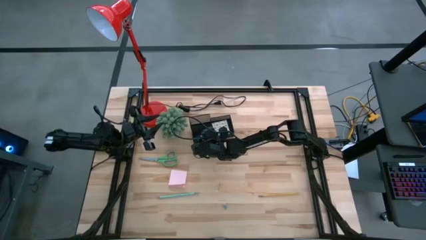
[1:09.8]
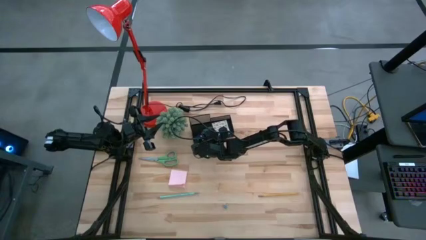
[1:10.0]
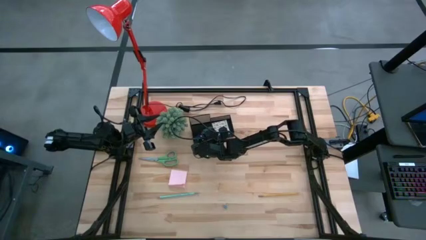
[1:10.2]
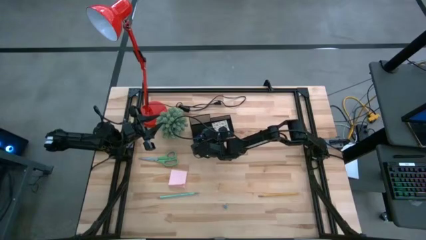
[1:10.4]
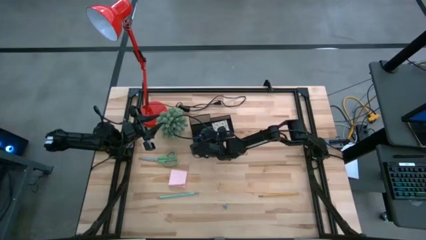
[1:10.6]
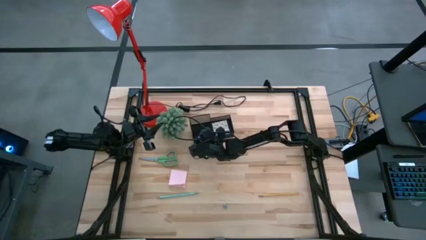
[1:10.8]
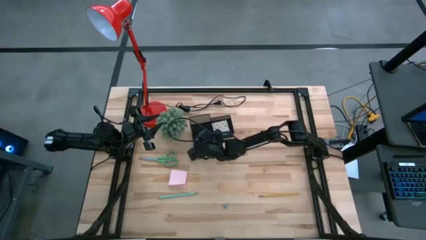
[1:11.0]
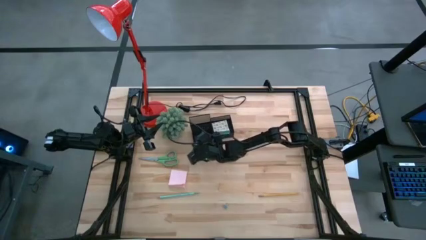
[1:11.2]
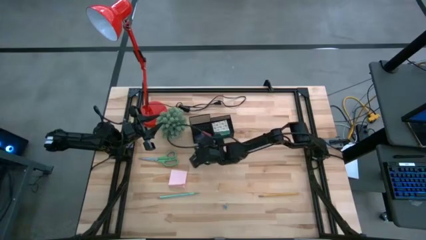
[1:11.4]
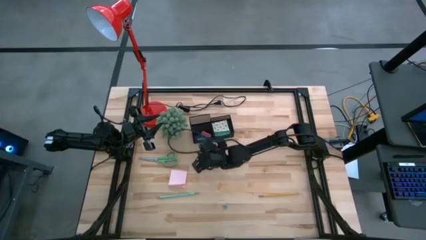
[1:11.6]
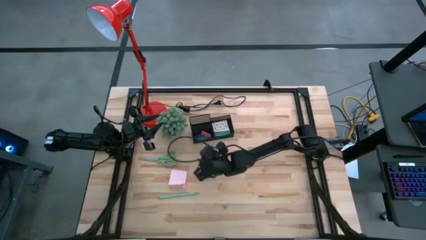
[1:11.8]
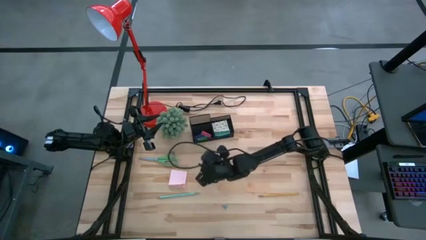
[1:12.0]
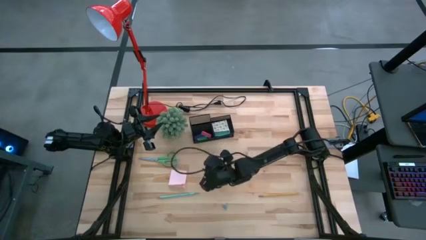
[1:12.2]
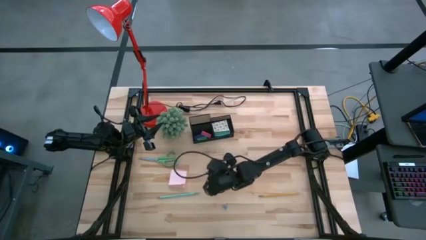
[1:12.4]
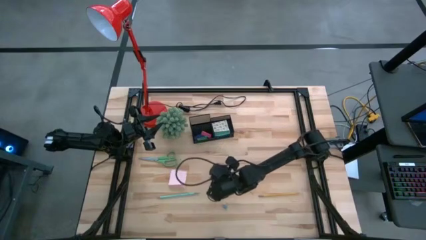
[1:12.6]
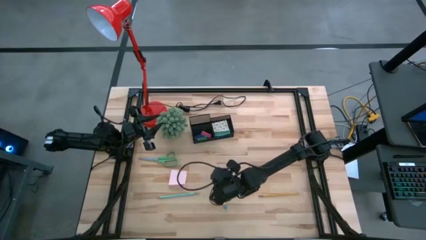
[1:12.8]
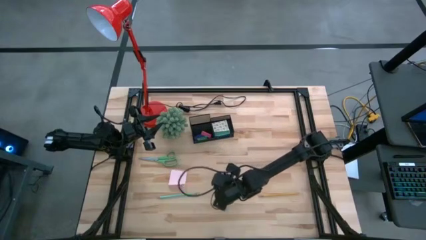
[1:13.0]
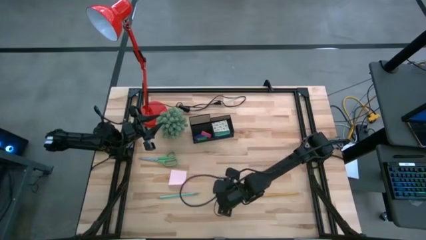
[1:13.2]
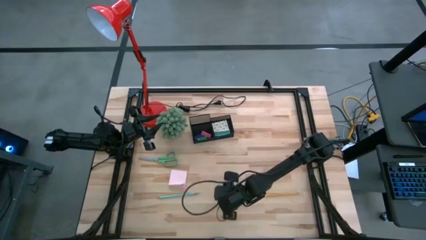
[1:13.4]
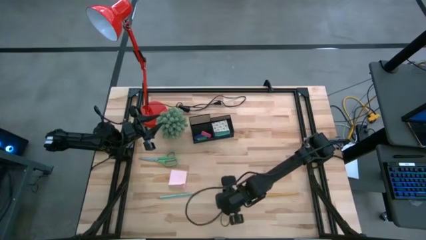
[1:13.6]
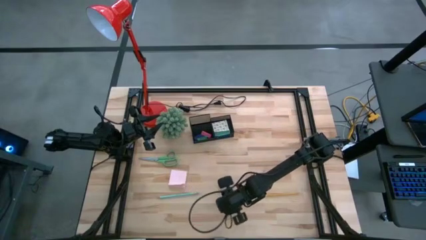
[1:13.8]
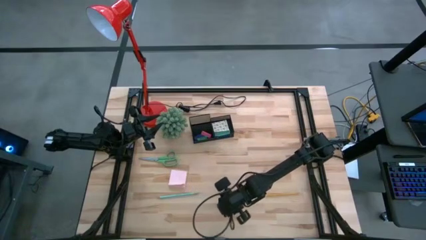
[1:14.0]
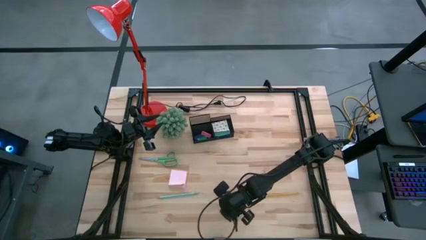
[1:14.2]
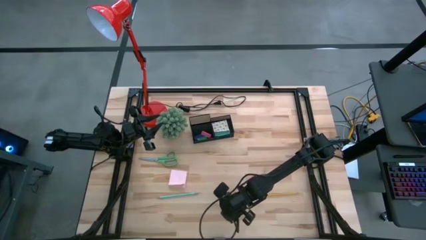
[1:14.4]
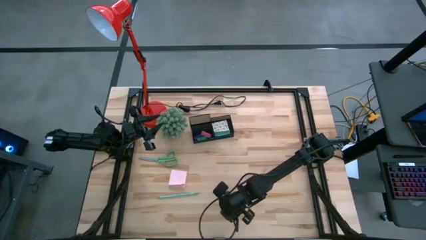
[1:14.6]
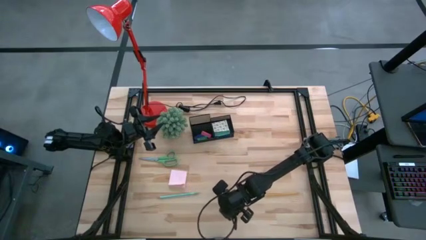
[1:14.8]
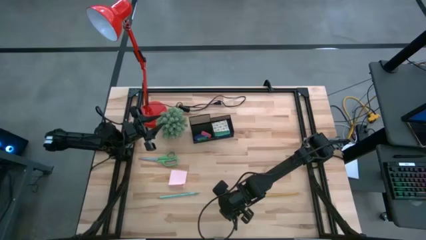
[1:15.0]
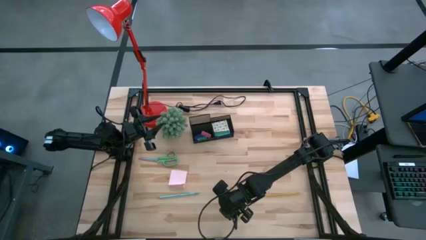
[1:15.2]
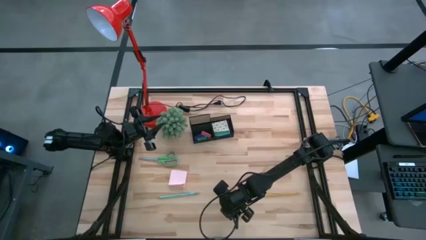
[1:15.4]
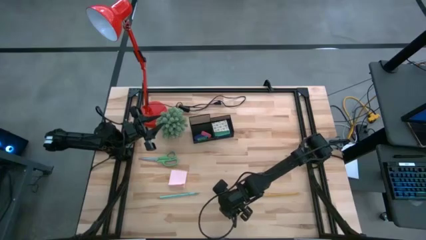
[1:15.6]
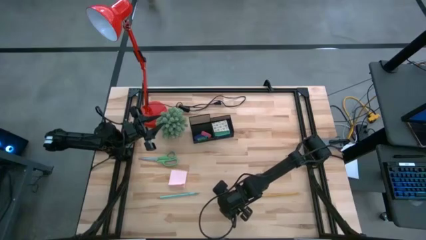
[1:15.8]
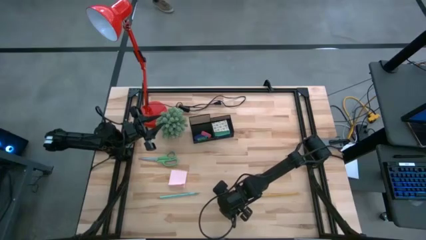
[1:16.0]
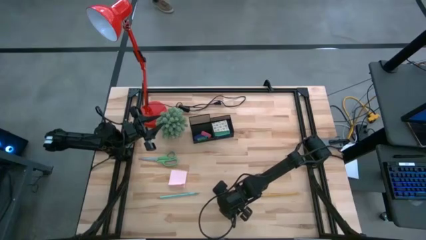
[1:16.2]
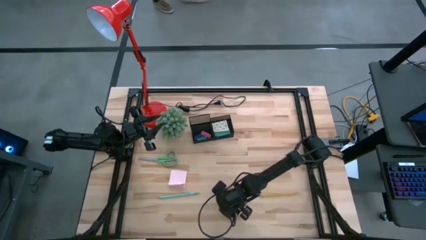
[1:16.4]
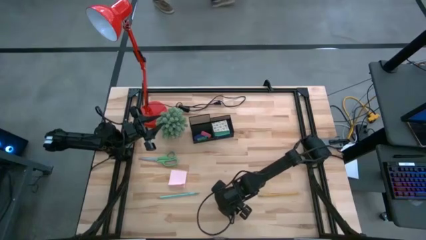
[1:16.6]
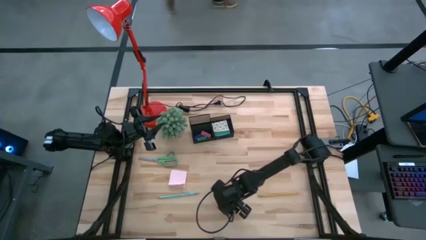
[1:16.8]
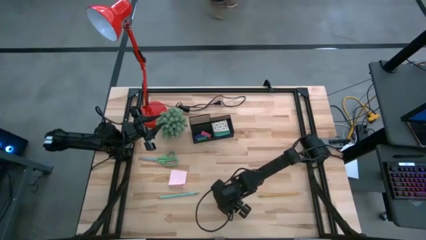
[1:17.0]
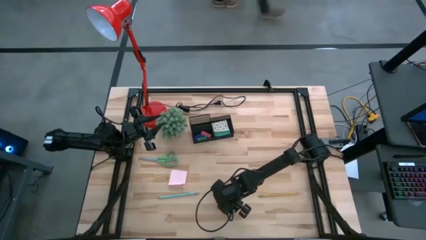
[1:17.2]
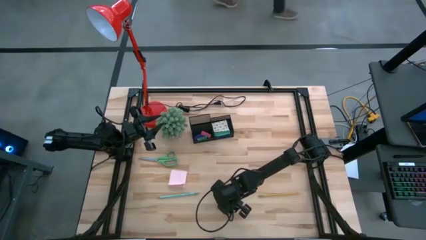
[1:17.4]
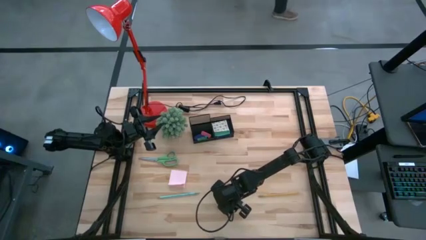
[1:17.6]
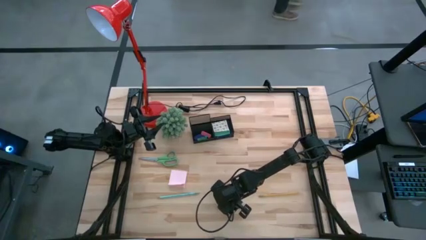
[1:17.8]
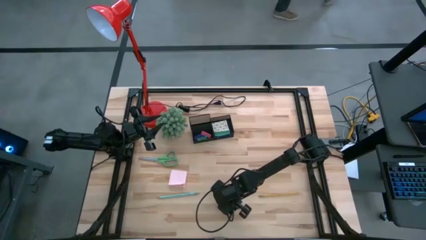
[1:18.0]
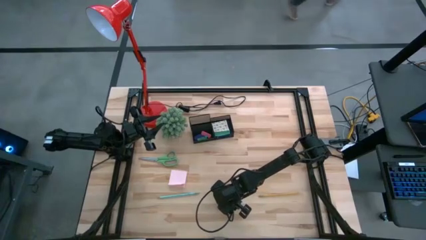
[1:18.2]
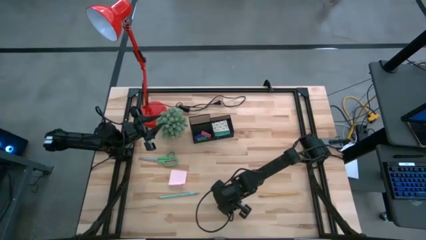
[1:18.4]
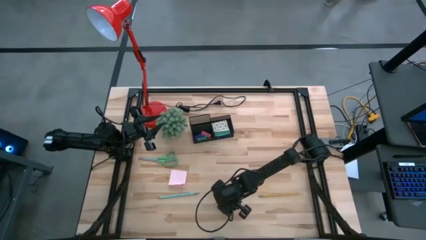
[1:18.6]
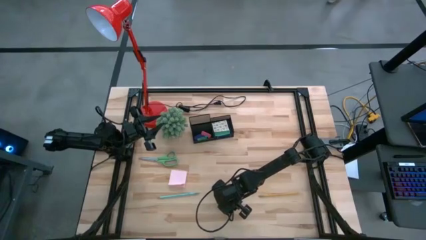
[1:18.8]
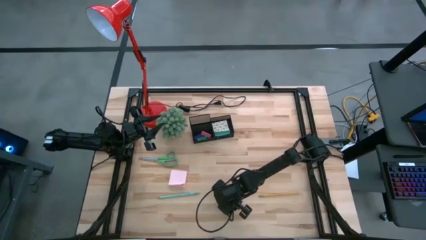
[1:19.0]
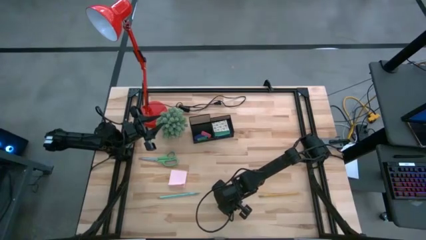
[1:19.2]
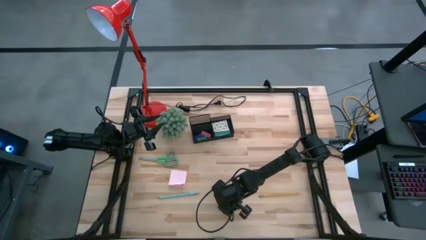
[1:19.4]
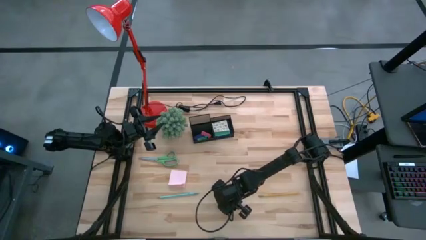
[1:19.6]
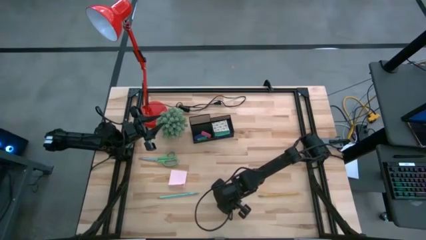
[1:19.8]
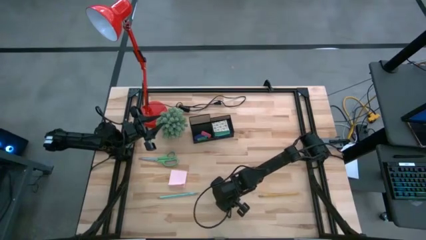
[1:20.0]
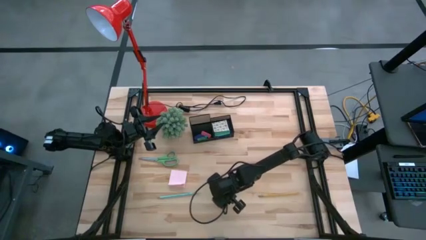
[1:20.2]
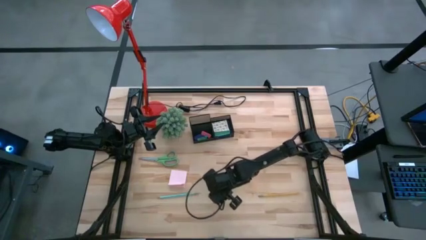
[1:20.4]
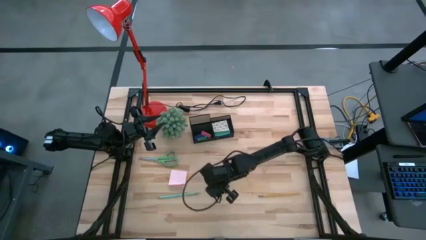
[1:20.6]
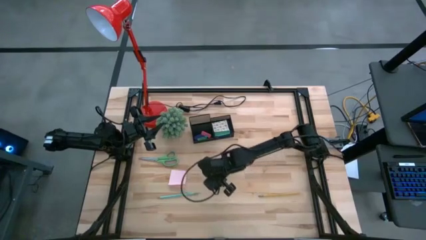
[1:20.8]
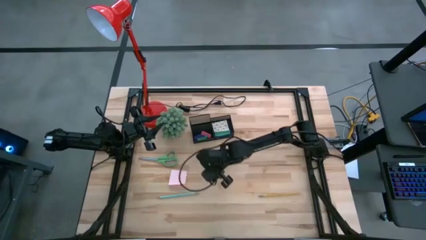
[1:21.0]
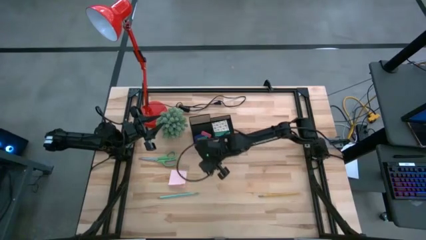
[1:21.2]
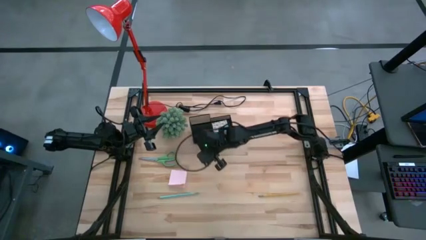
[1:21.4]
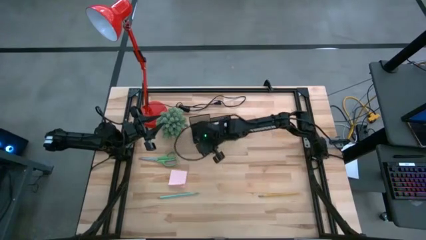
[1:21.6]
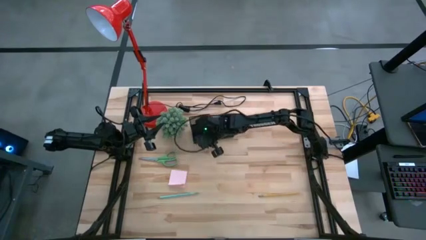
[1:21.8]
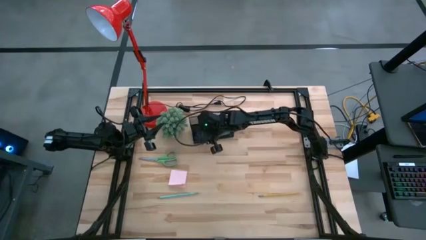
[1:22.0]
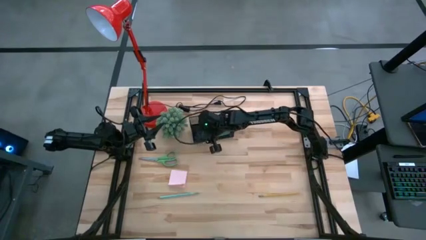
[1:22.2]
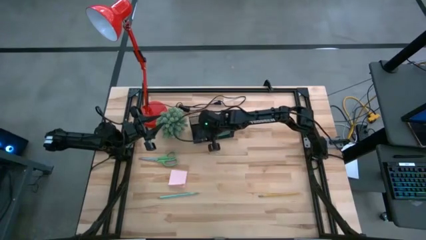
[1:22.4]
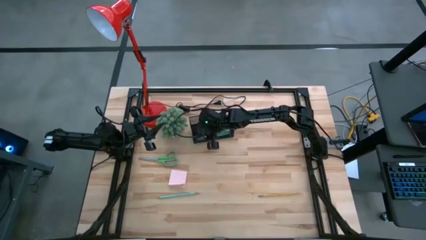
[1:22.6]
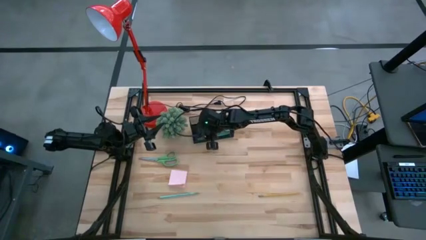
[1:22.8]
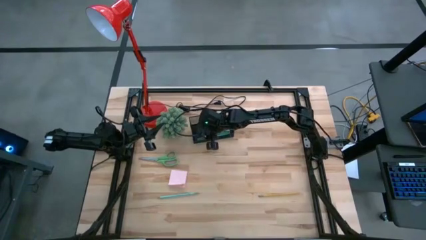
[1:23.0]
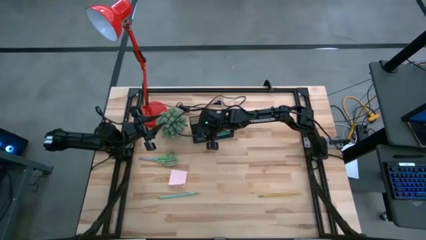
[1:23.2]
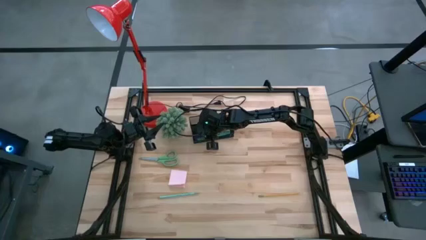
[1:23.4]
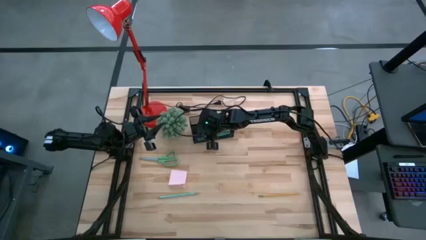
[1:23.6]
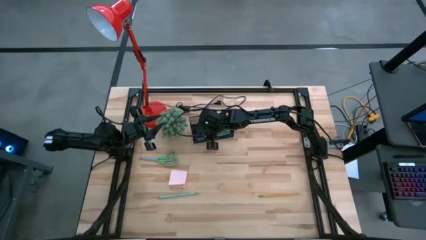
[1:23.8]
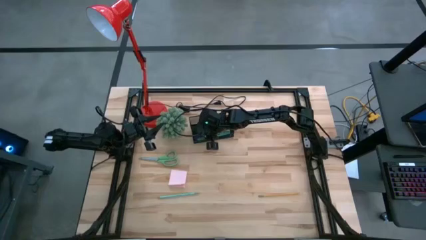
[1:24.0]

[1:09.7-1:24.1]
Task: Pick and place office supplies into organizer
Put the blue binder clip into the desk organizer

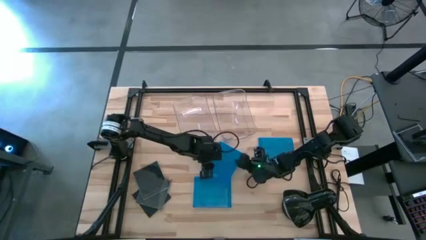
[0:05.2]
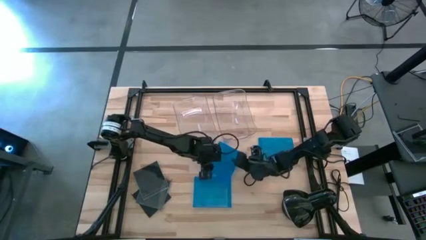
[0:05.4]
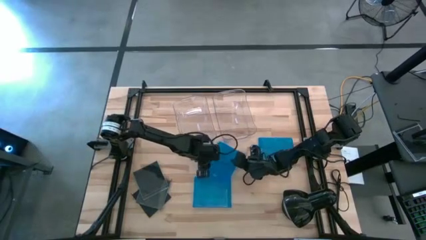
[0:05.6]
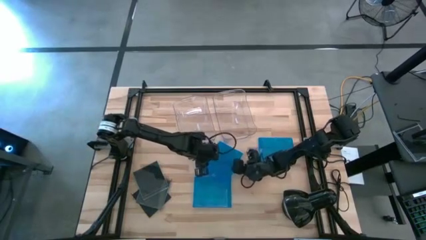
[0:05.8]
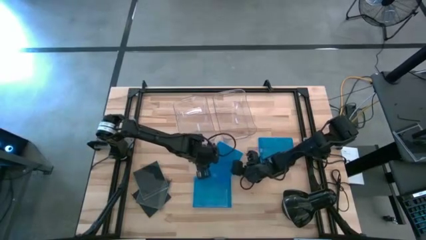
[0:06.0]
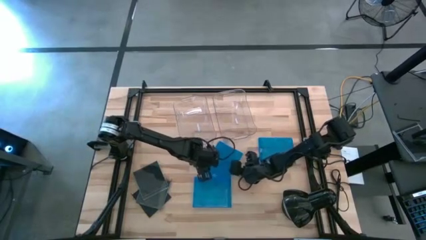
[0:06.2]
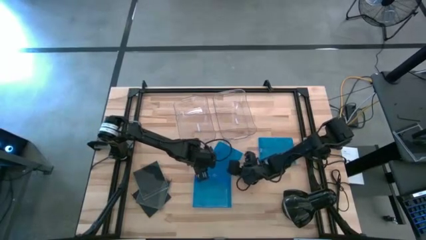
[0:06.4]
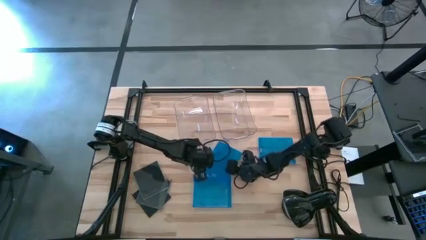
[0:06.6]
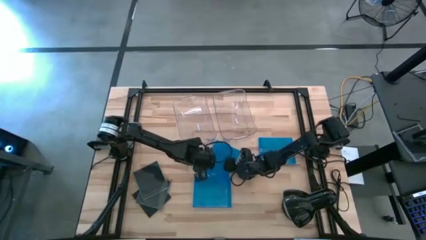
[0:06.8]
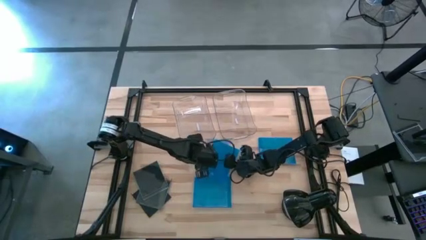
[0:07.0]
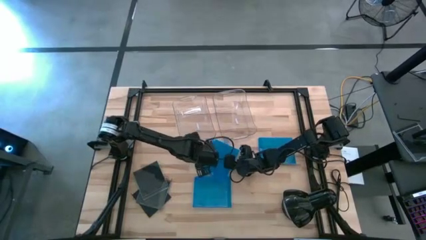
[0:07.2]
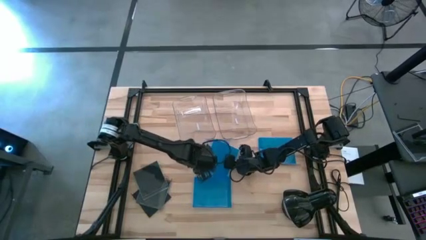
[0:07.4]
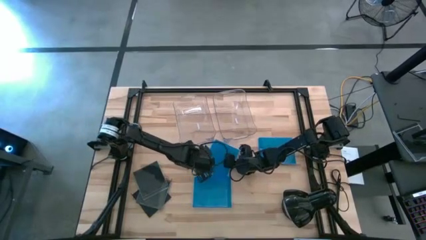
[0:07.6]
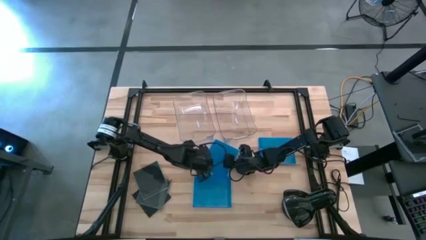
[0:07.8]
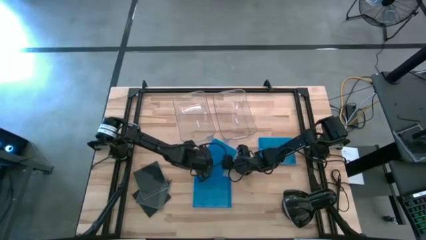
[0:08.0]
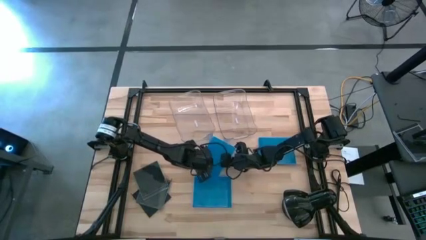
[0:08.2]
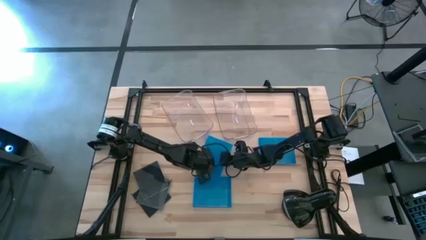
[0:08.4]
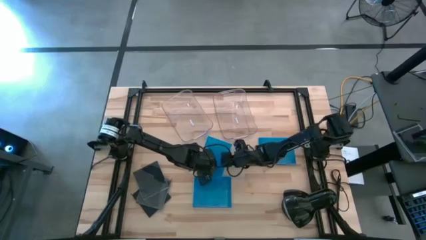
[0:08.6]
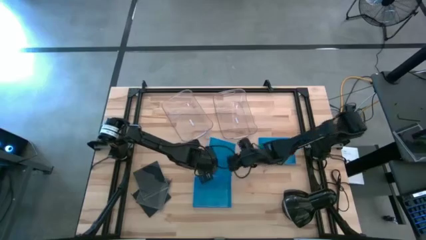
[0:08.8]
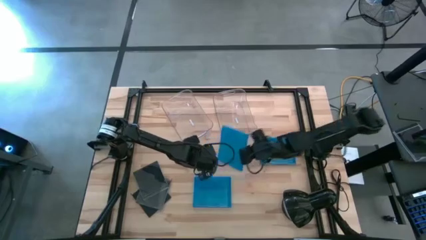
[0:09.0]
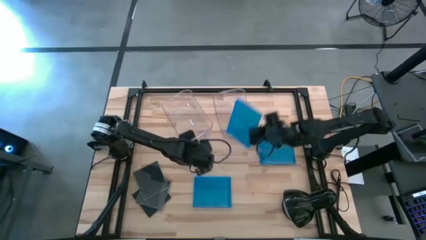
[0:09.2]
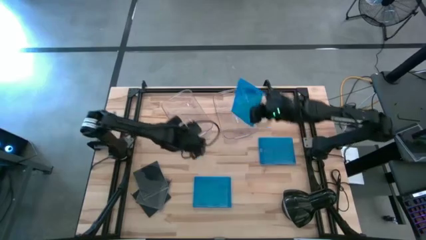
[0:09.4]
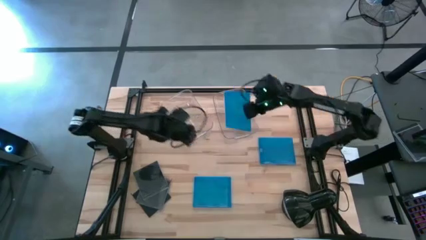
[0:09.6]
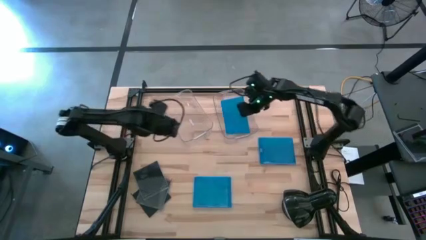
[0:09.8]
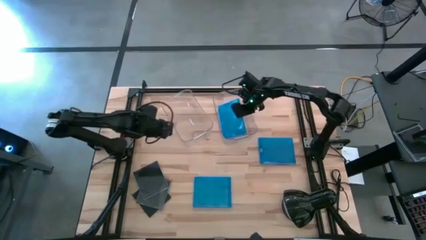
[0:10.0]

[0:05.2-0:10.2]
Task: Pick & place jewel cases by type
Put the middle blue CD case into the right transparent bin
